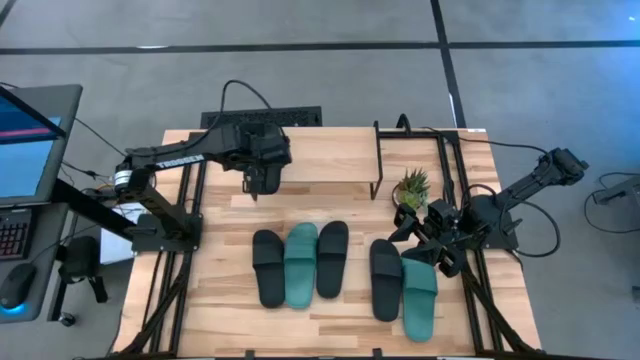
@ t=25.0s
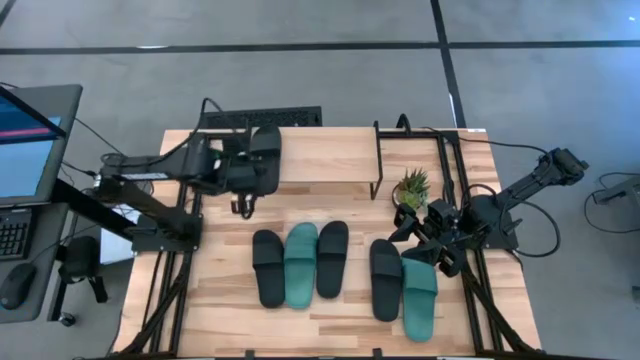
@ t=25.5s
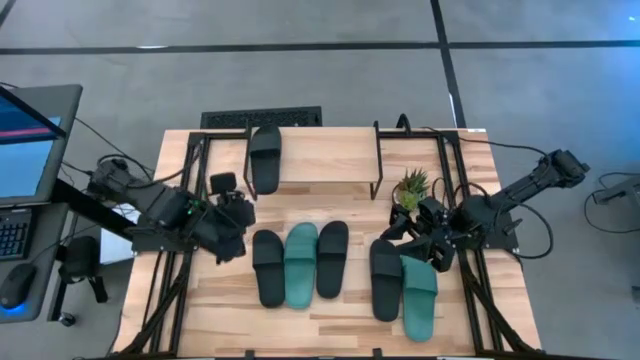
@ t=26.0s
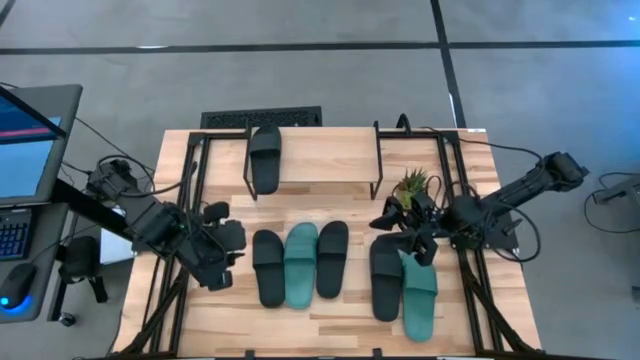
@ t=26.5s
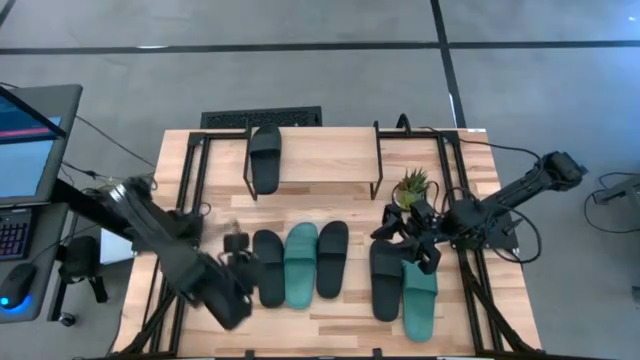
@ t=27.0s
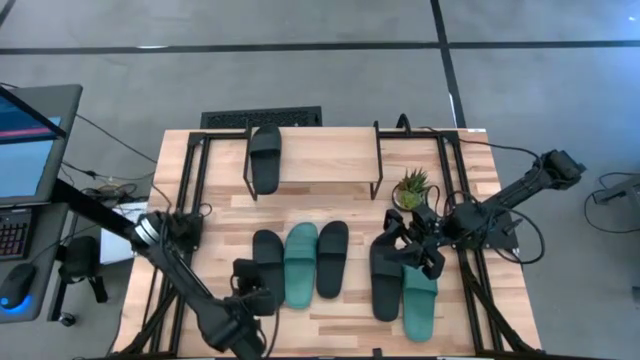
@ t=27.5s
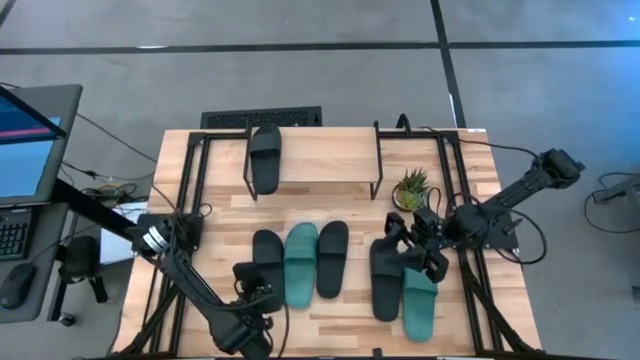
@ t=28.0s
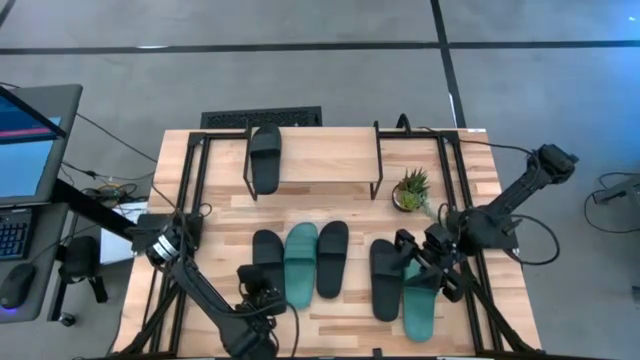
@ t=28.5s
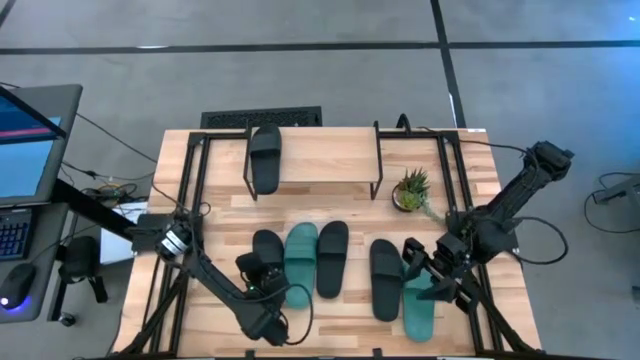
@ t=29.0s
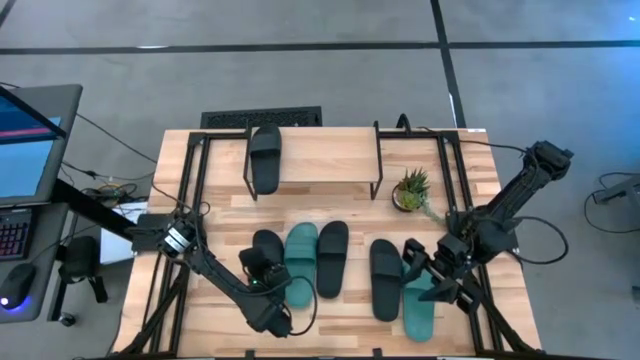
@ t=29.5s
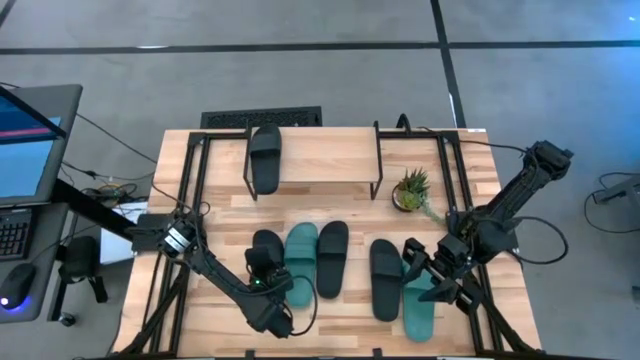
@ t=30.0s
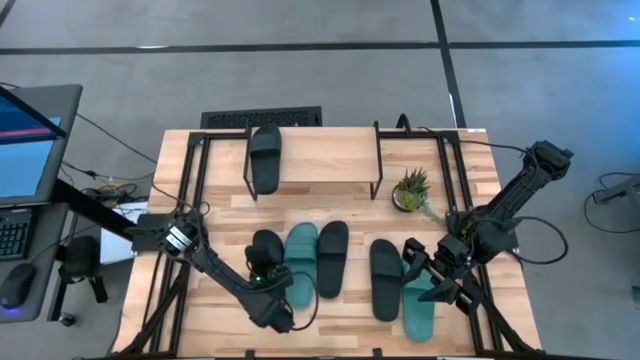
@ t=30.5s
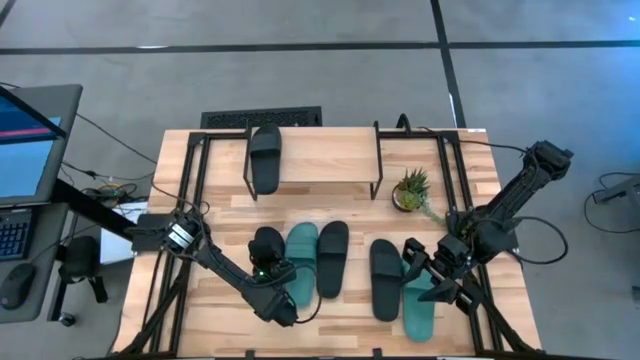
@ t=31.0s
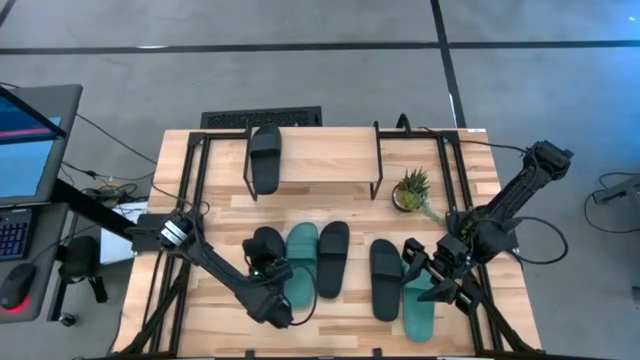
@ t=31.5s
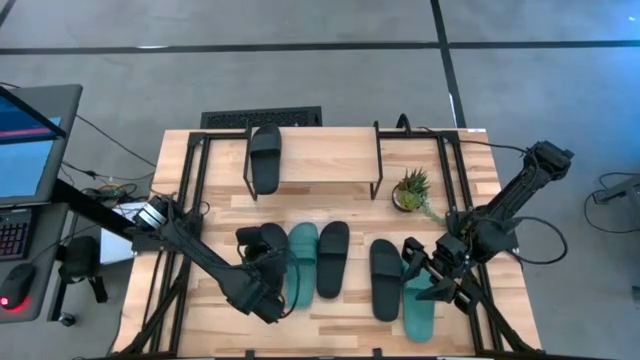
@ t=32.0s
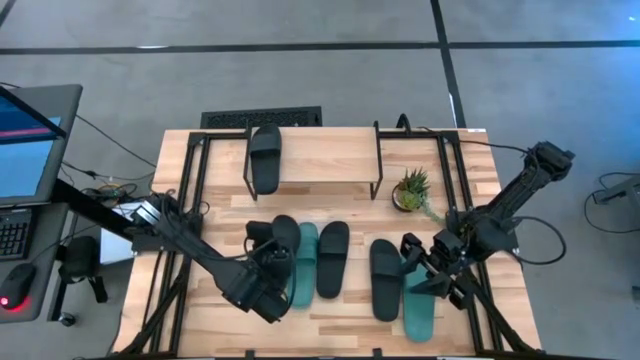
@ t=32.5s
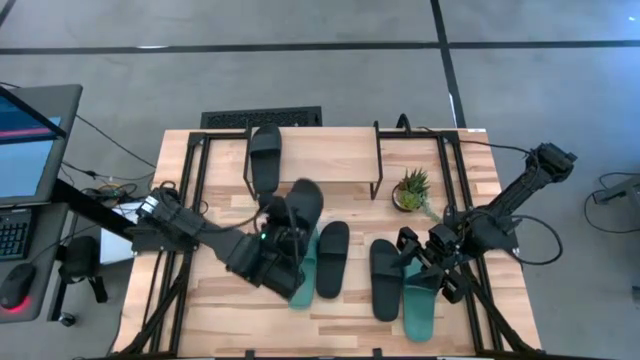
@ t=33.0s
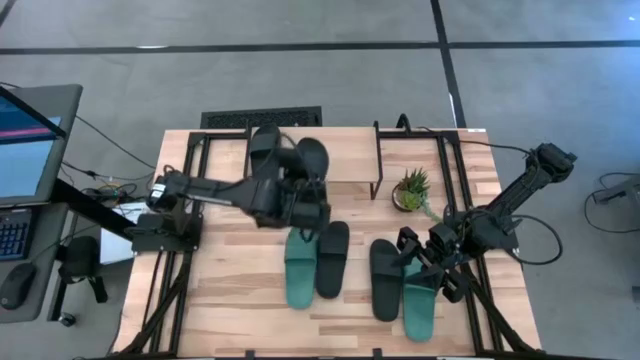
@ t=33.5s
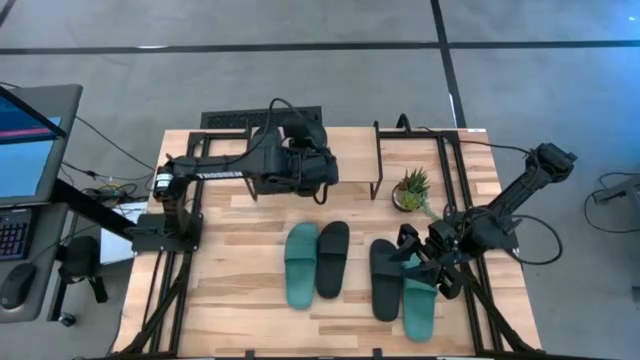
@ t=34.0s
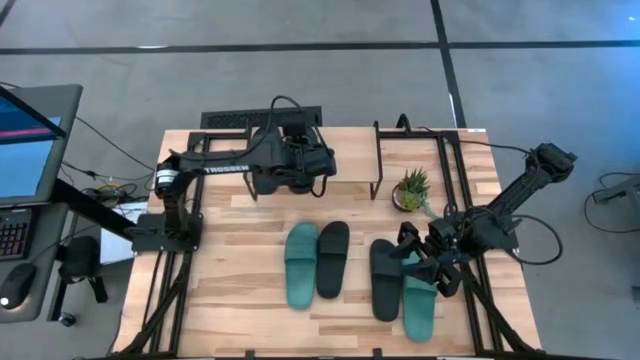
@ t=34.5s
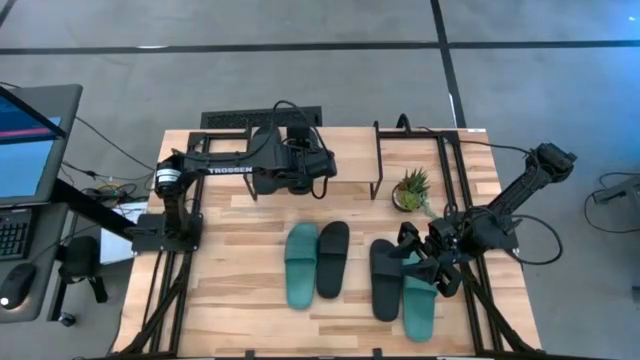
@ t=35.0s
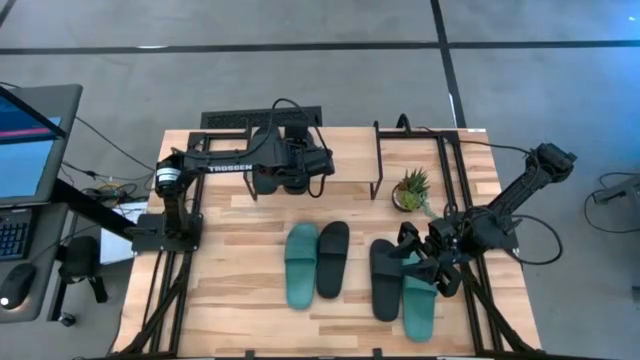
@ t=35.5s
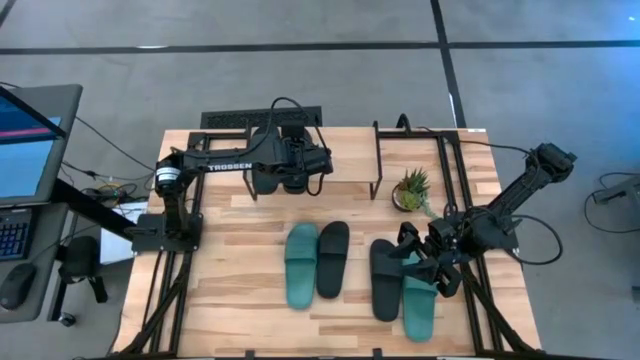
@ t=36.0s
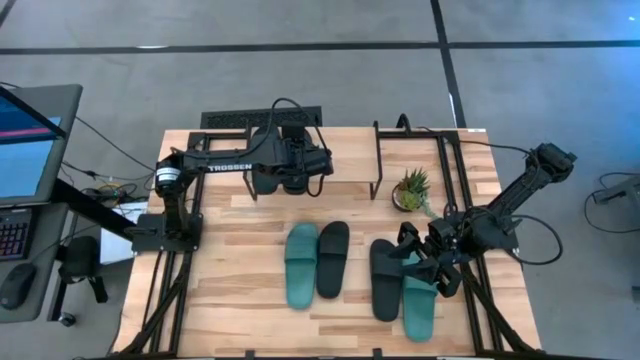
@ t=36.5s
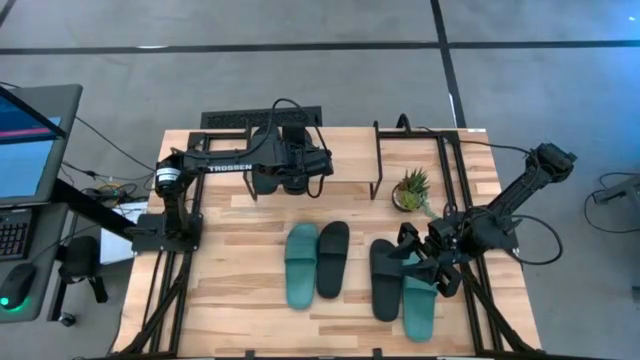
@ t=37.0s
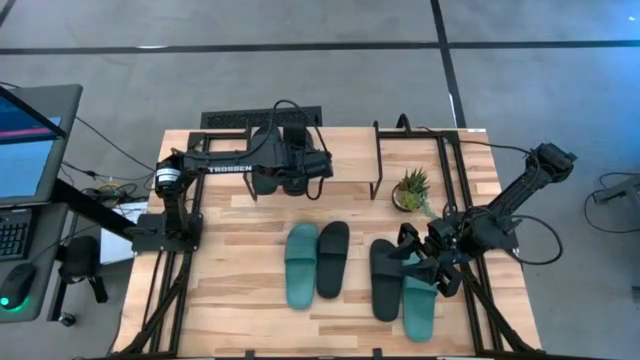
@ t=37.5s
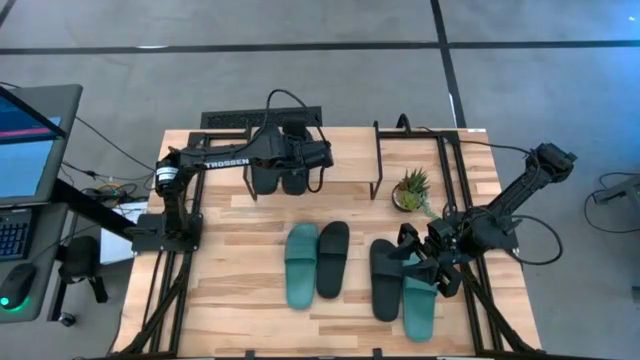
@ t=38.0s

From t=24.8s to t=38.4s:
Task: Pick and place slides into the shelf
Put the black slipper on the shelf

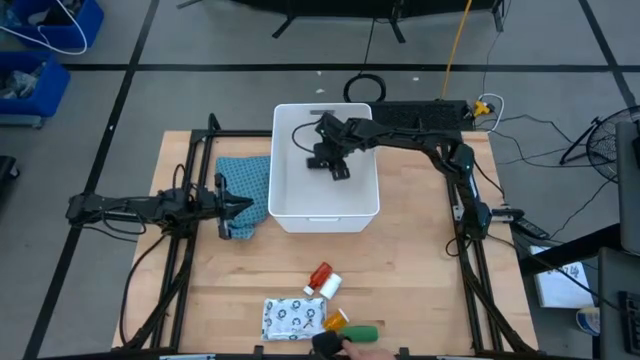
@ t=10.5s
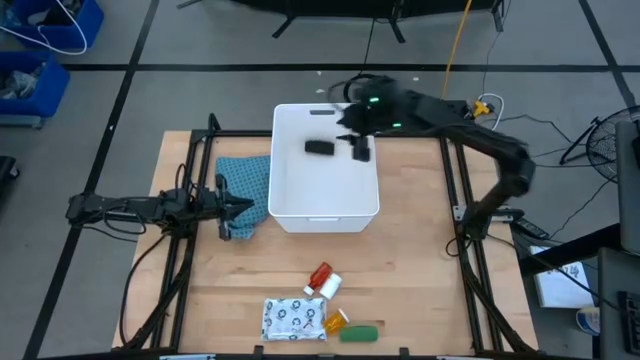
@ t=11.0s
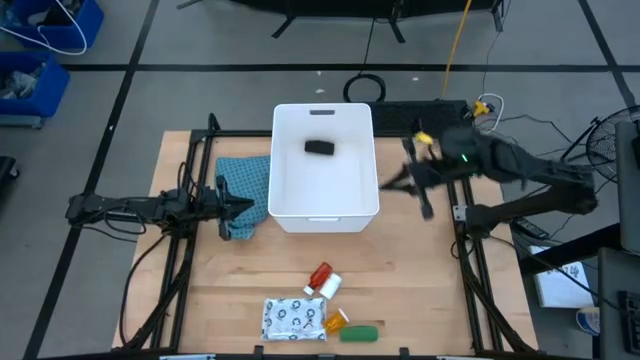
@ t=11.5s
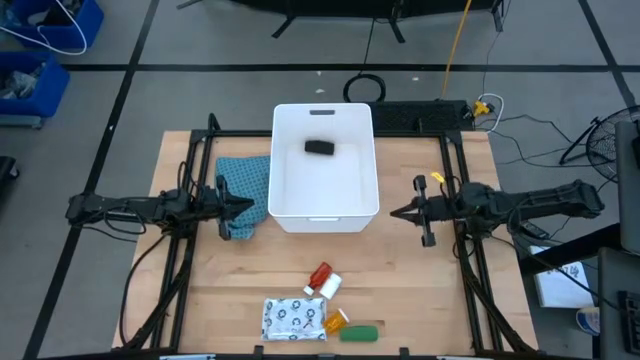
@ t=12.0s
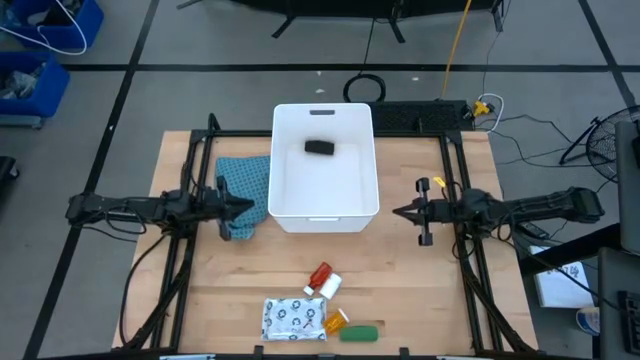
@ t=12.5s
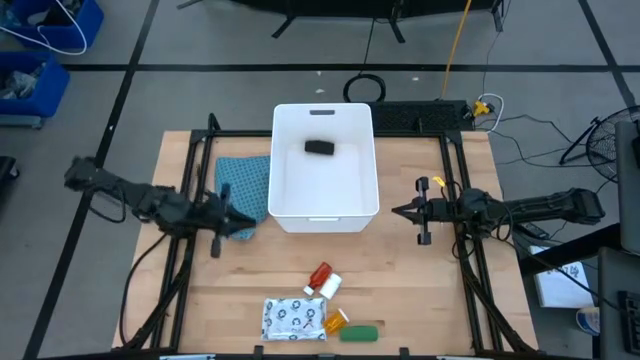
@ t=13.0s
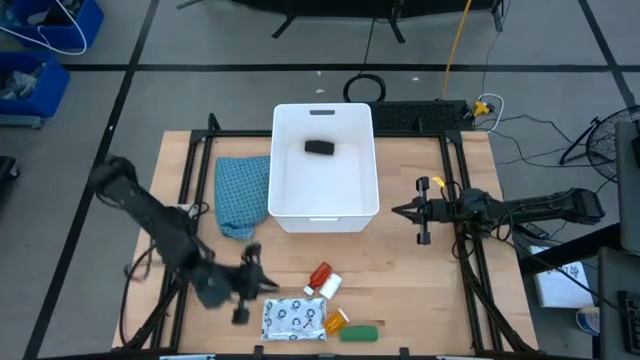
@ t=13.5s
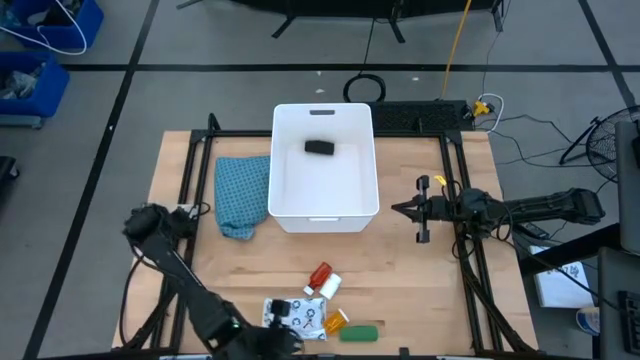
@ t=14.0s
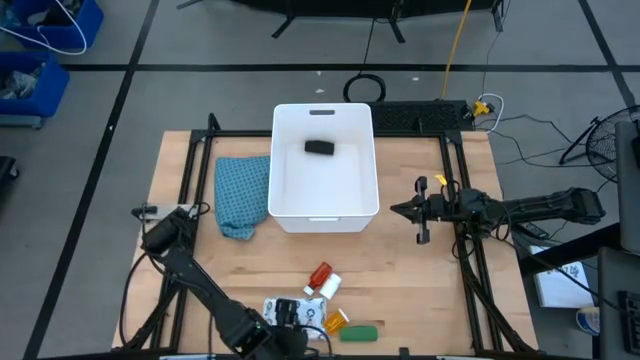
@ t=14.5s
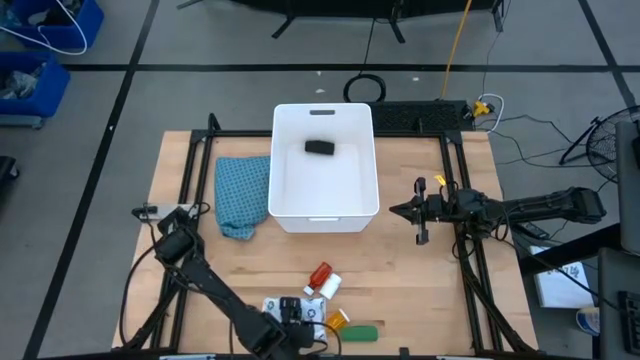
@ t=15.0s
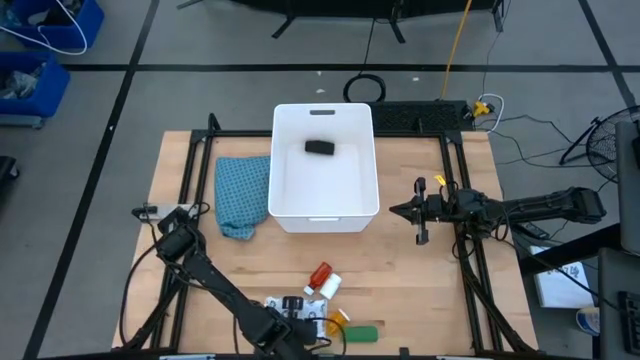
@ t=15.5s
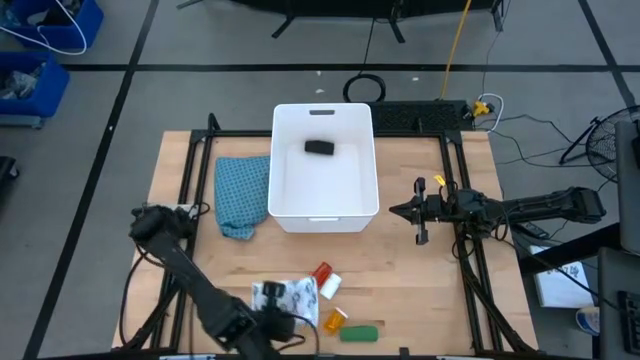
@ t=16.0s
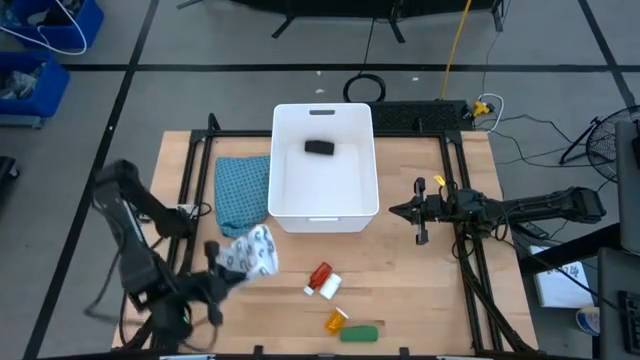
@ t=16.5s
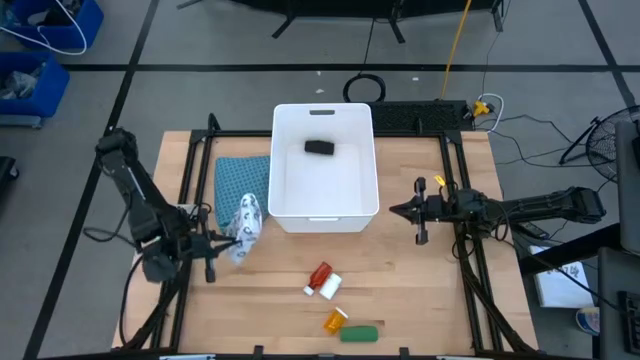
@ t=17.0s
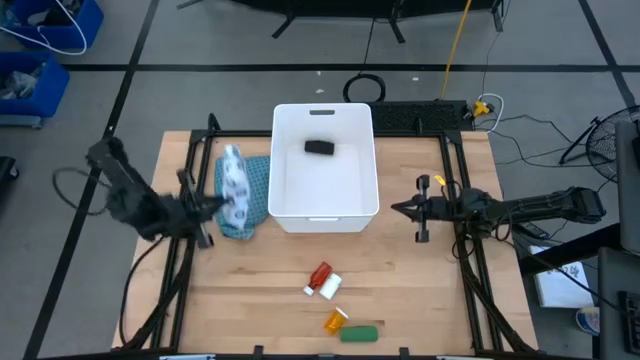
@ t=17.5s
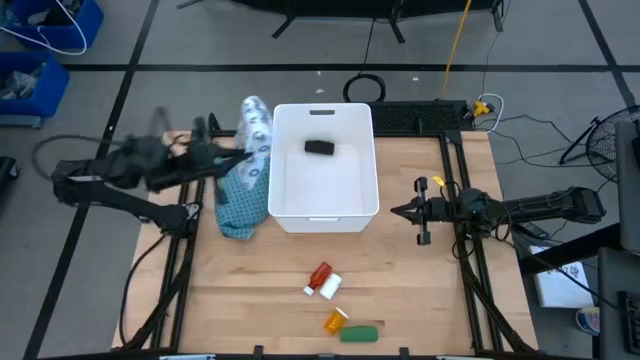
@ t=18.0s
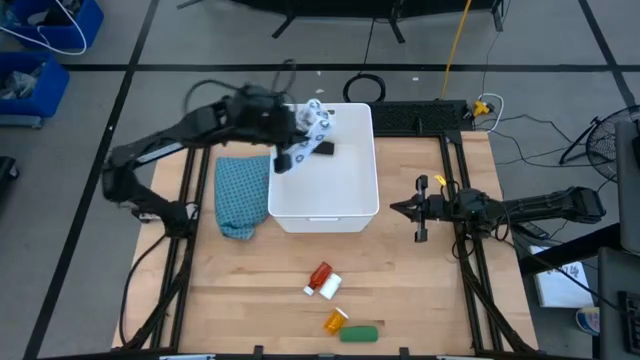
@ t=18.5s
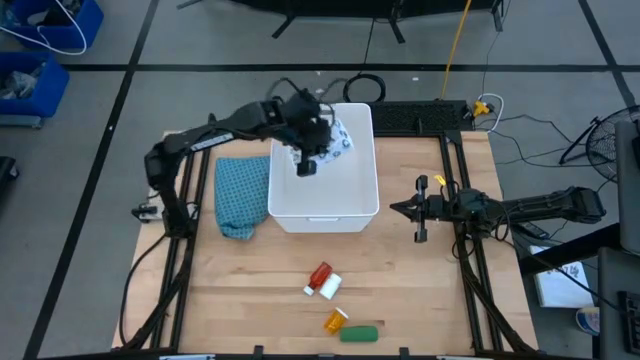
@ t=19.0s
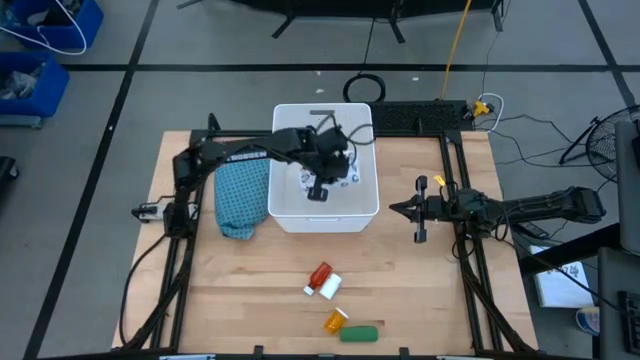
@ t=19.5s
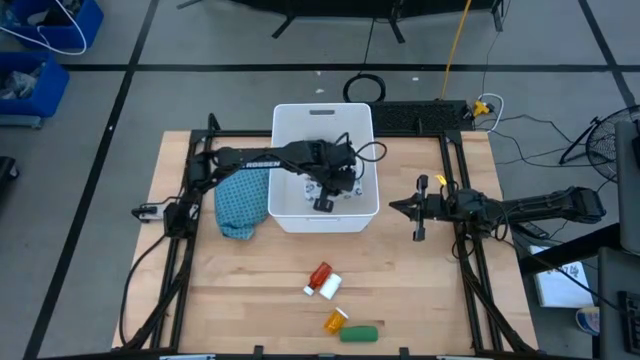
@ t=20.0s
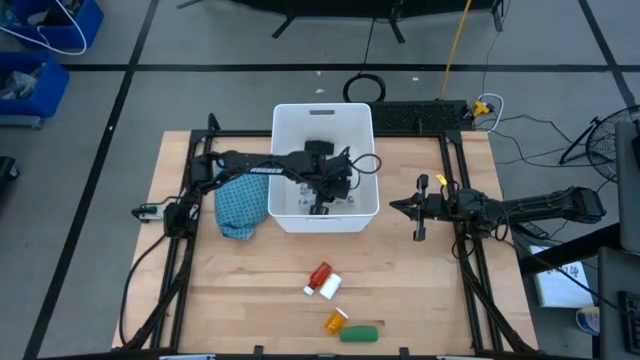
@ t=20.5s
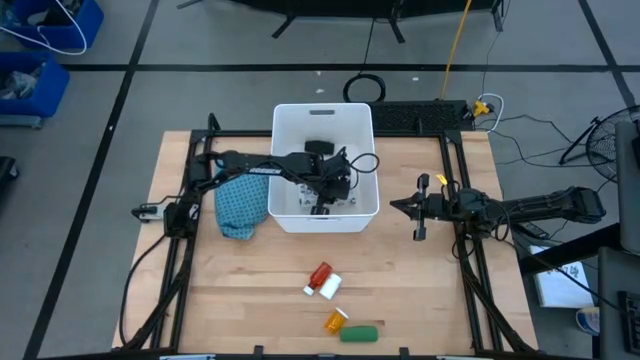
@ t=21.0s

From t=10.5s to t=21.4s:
Task: Pick & place medical supplies in basket/bin
Put the white mailer bag into the white container
